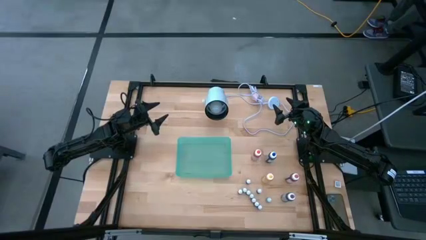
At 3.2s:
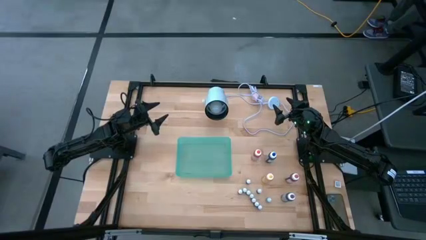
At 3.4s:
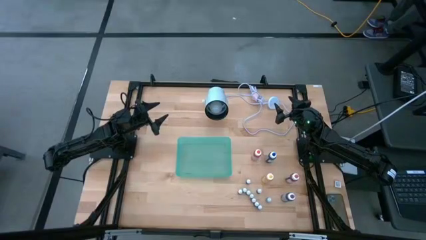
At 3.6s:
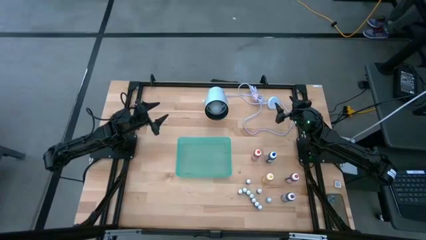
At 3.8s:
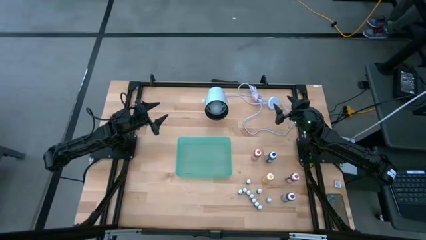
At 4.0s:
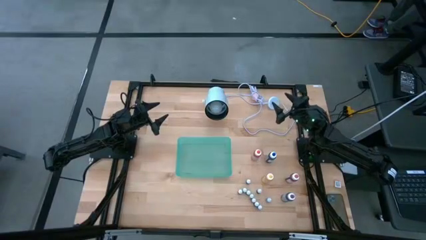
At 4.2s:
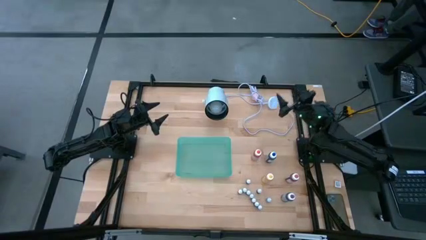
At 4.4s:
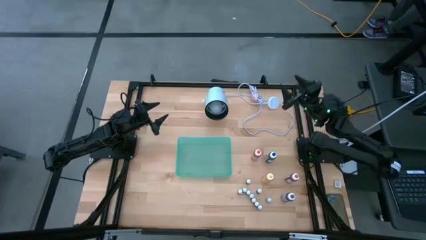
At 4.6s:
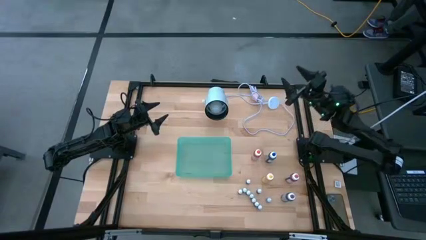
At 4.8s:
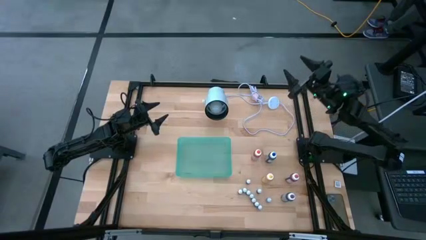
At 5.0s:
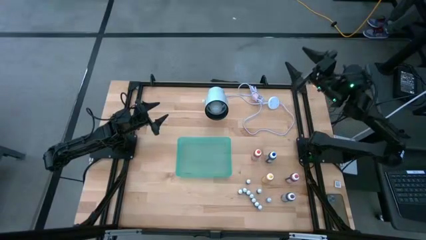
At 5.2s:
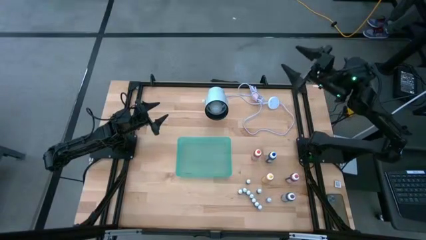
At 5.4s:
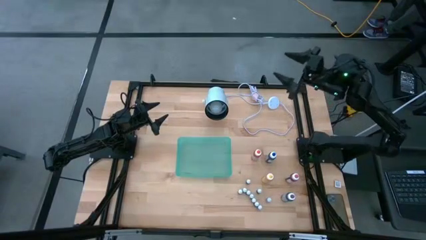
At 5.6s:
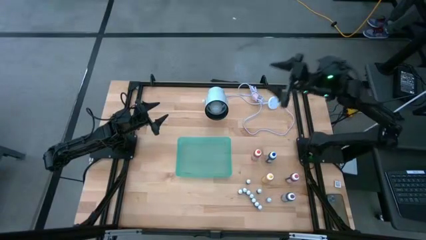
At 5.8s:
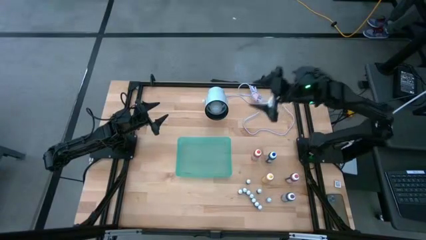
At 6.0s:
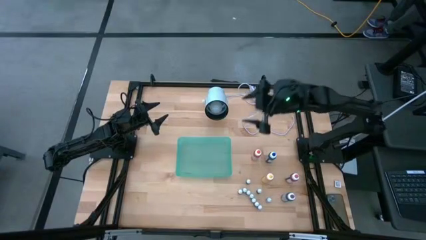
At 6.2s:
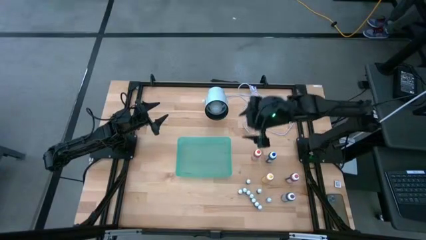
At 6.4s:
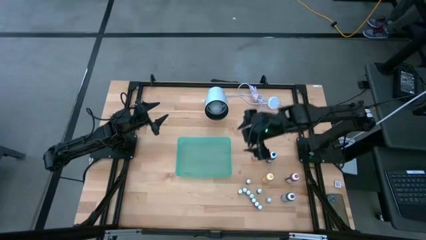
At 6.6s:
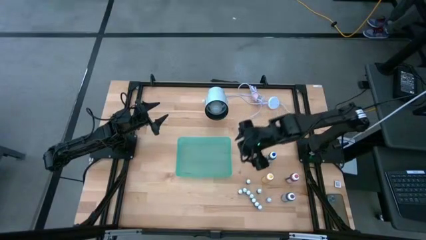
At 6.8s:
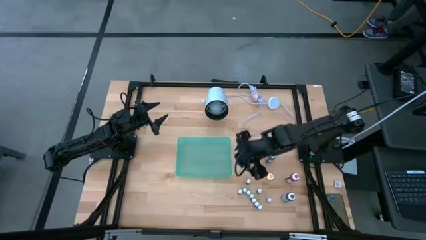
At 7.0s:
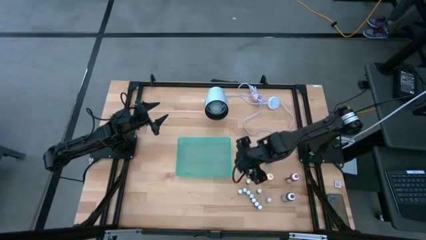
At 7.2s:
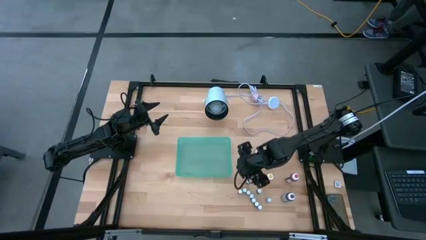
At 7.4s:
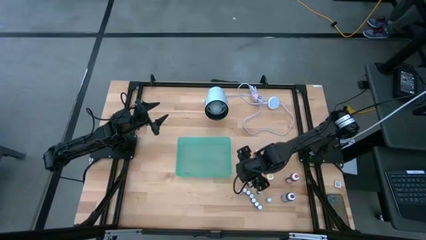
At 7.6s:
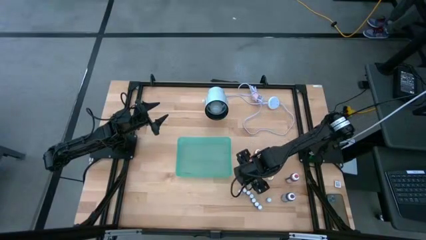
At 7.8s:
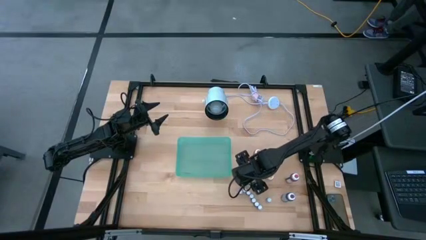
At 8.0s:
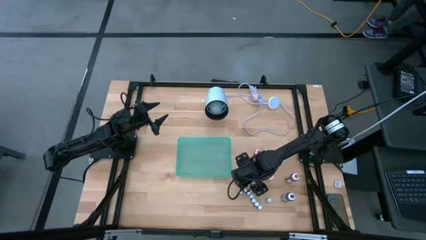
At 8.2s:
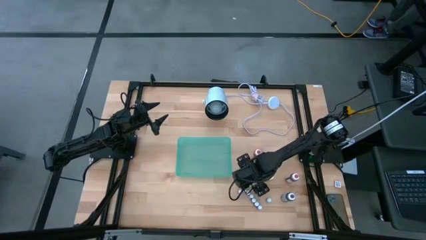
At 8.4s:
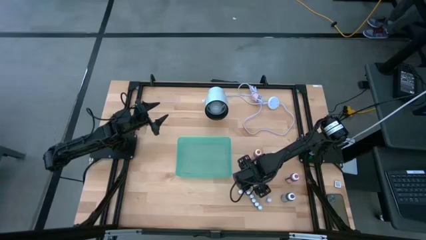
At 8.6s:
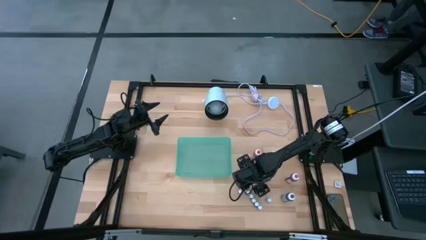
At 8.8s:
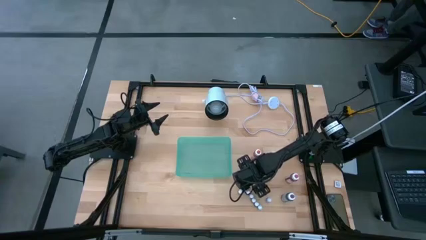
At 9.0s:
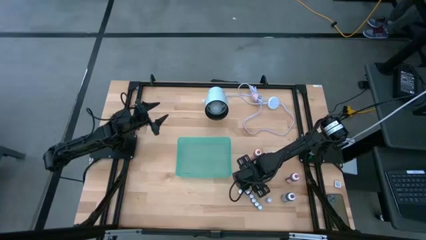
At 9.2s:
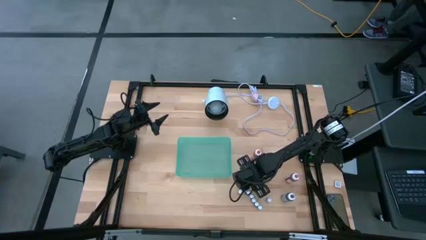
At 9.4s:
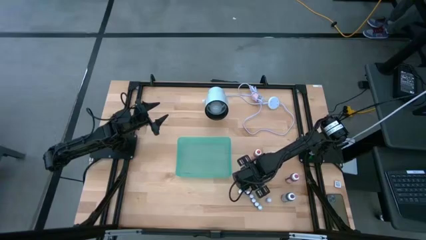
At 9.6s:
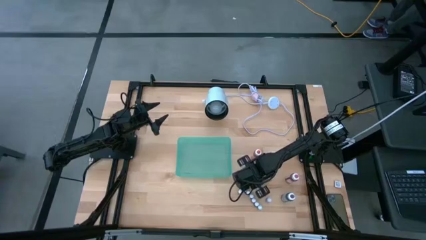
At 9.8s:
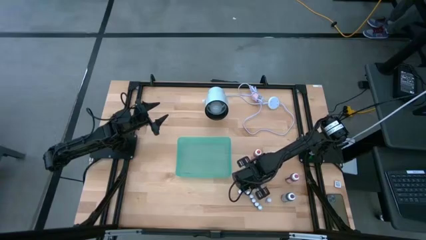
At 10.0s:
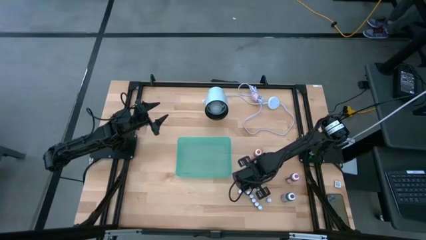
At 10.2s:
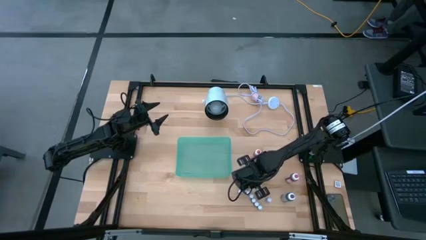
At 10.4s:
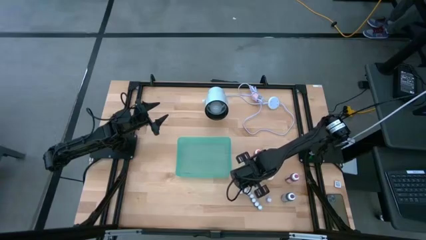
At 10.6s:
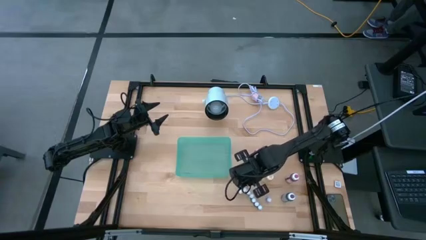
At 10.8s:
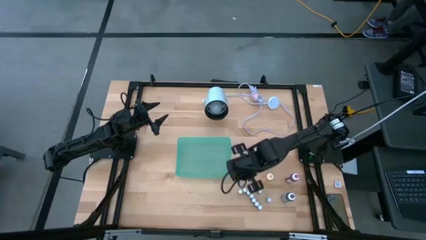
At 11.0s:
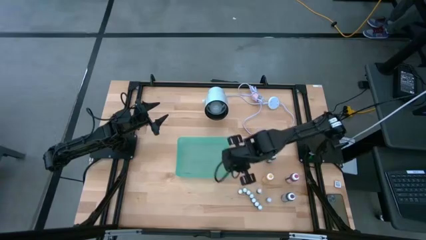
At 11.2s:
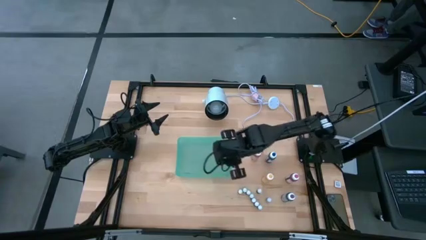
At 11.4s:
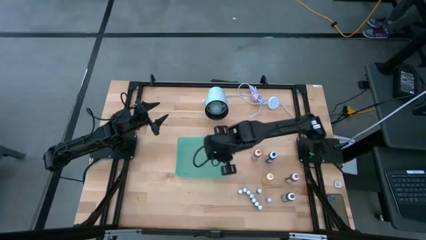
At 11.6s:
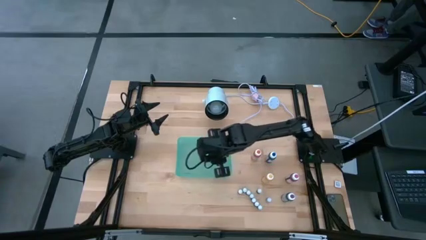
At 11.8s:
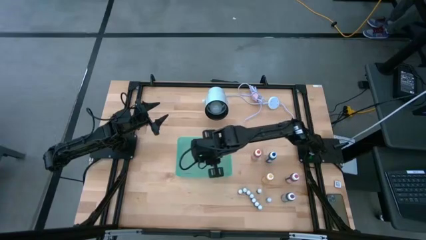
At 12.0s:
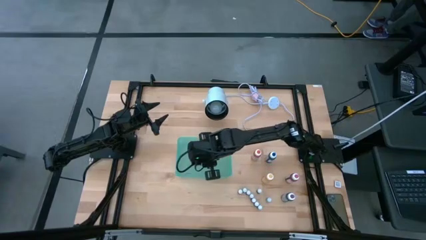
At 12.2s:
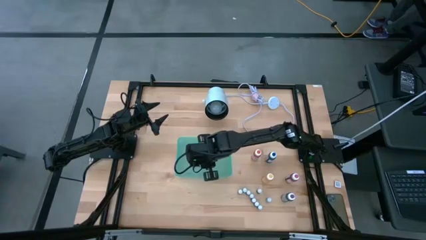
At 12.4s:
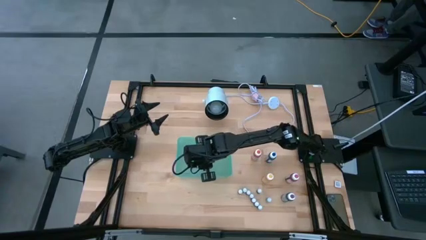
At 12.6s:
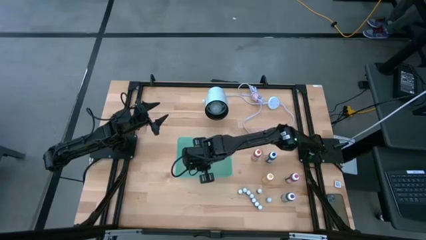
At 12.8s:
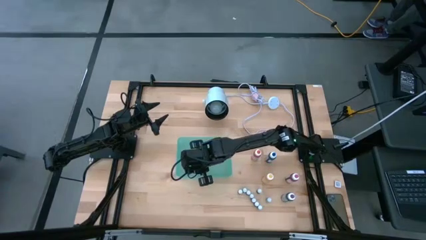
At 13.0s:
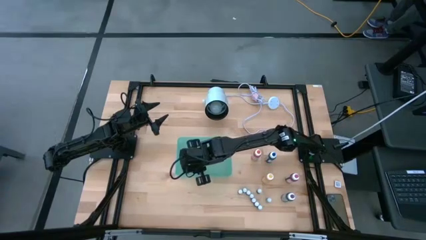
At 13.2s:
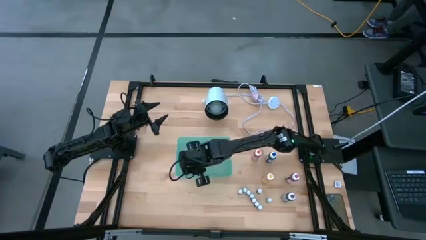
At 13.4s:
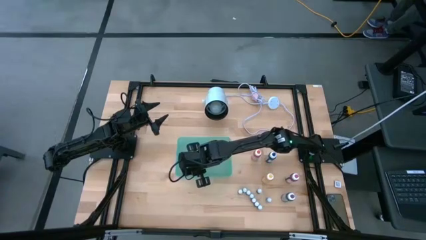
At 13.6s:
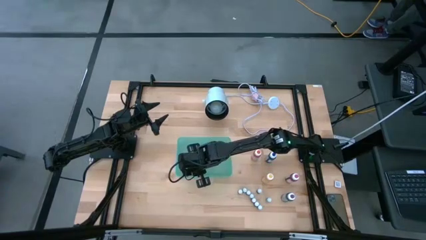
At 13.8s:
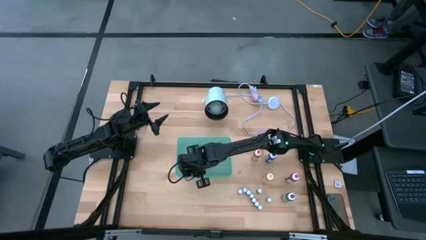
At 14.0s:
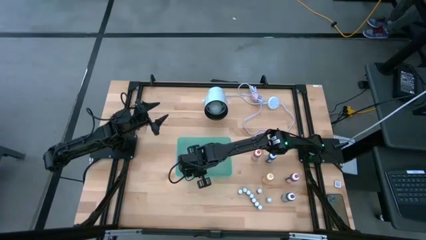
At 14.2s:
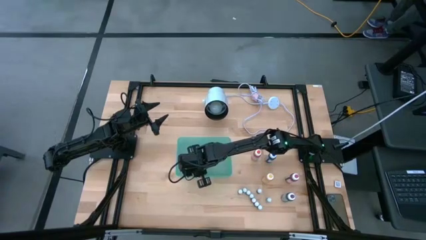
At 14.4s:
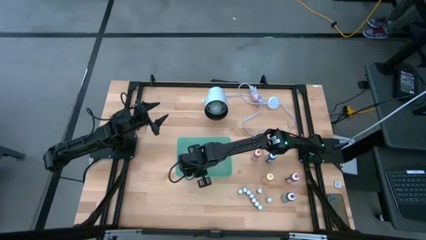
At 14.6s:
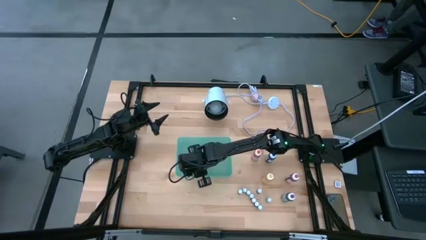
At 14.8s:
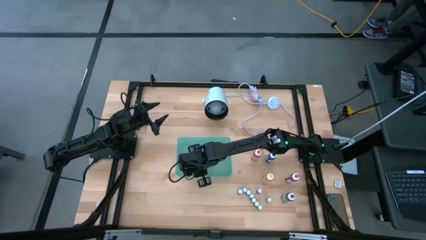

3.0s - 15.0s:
Task: Pick & Place food coloring
Put the small black food coloring bottle into the bin
